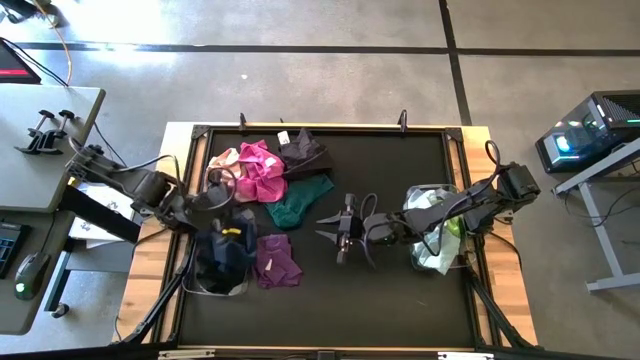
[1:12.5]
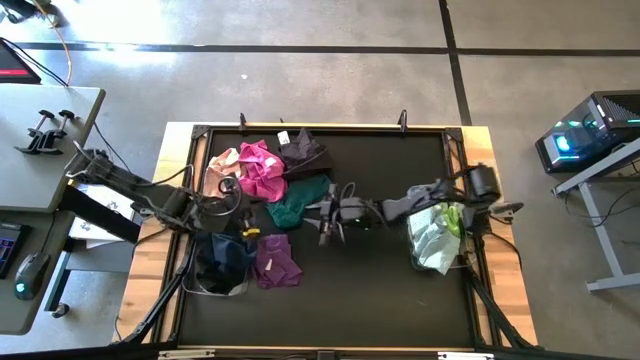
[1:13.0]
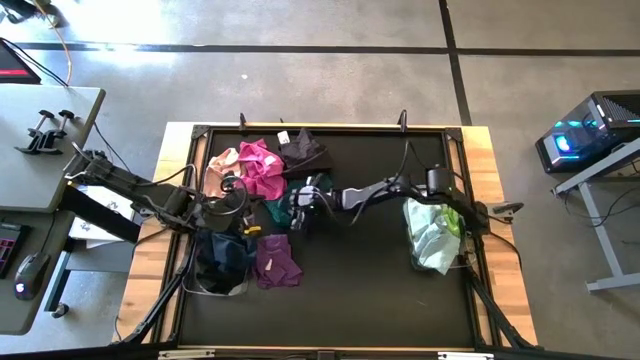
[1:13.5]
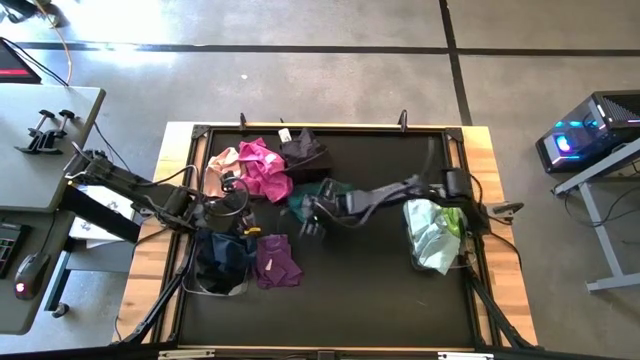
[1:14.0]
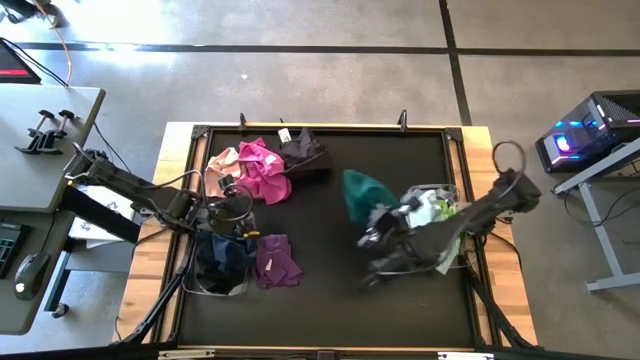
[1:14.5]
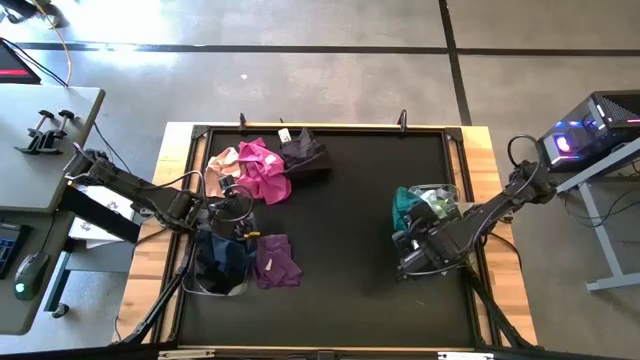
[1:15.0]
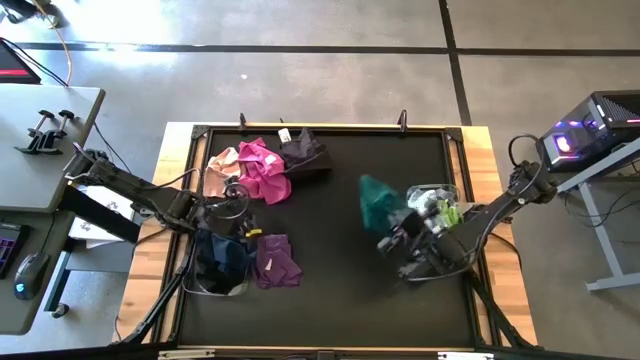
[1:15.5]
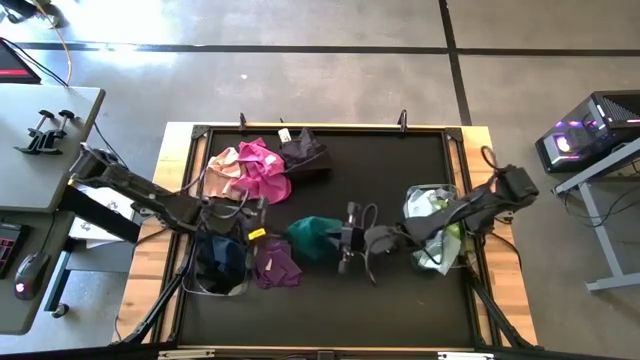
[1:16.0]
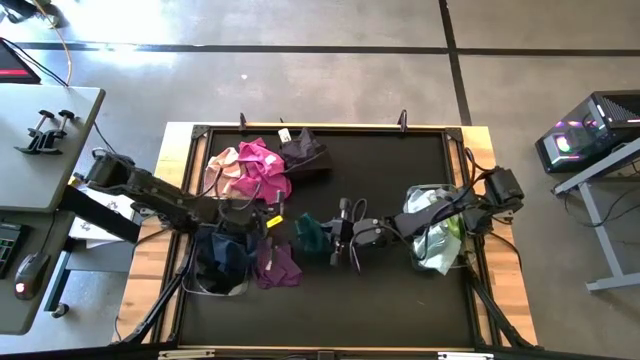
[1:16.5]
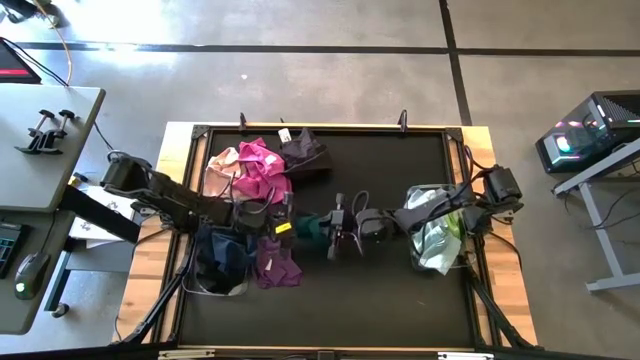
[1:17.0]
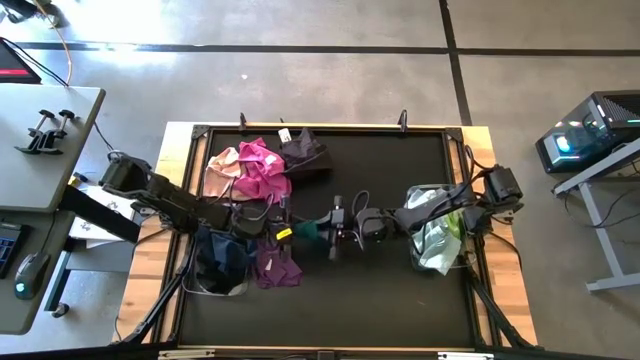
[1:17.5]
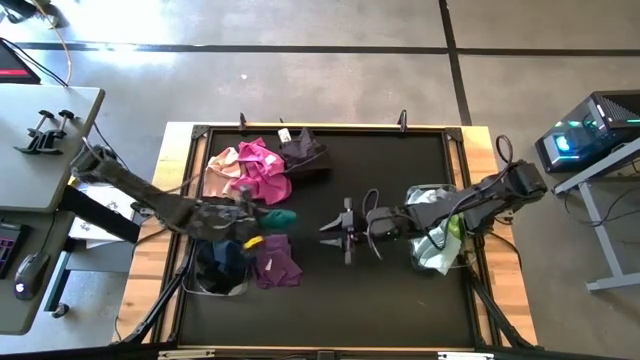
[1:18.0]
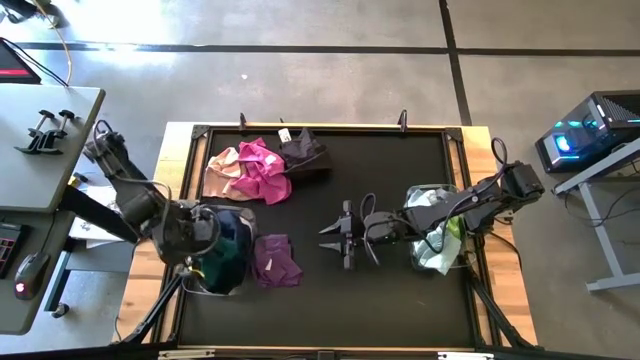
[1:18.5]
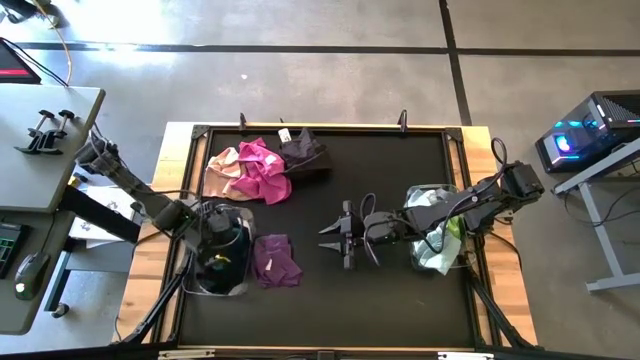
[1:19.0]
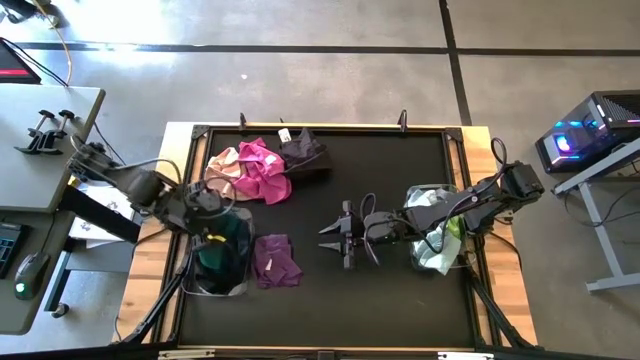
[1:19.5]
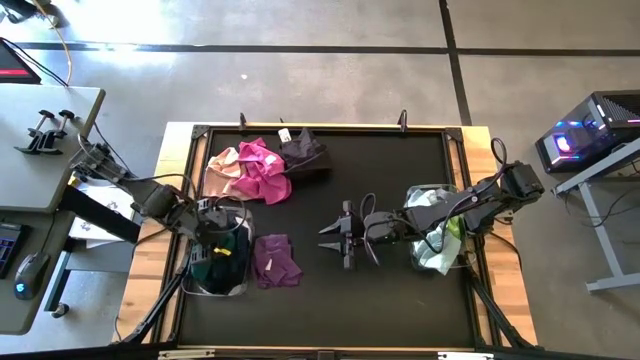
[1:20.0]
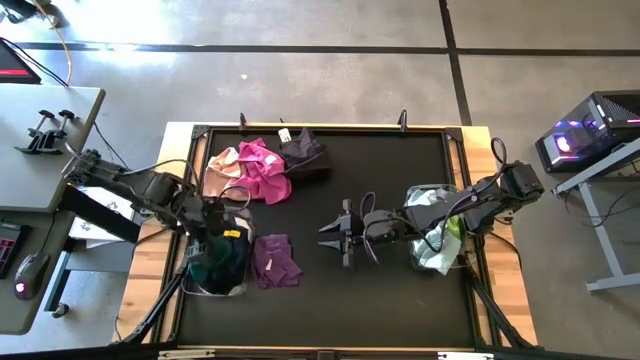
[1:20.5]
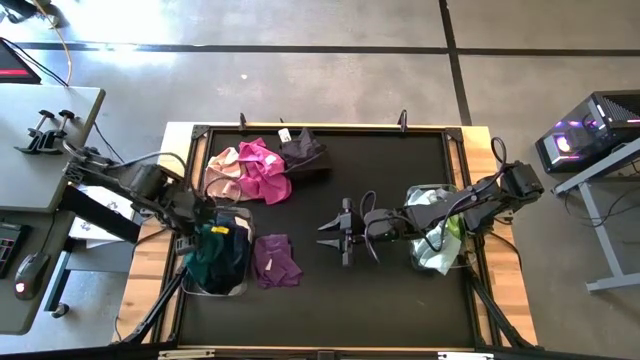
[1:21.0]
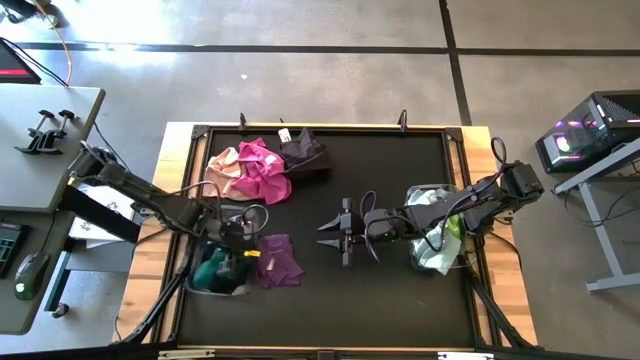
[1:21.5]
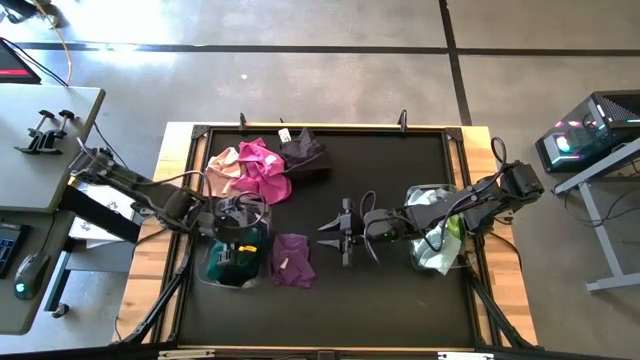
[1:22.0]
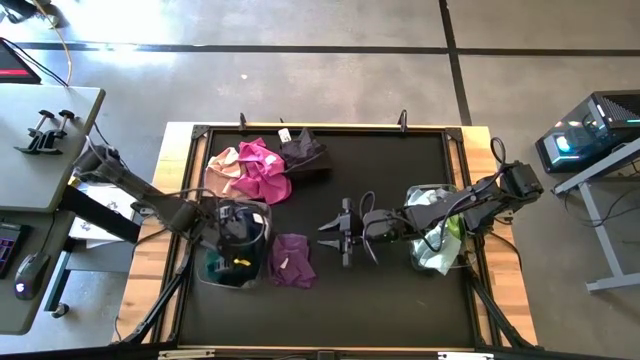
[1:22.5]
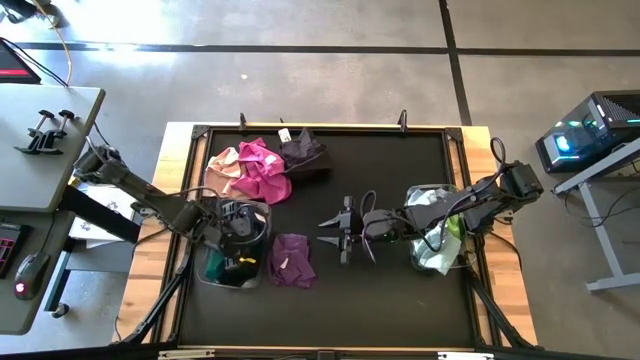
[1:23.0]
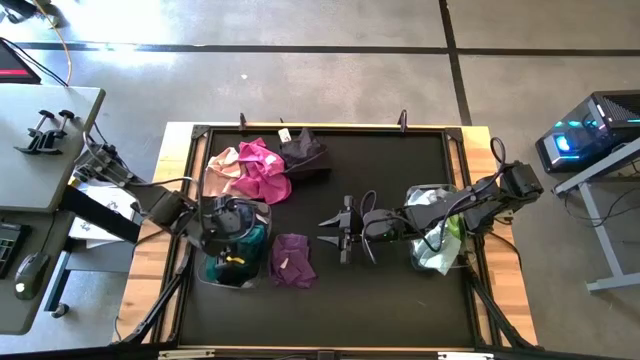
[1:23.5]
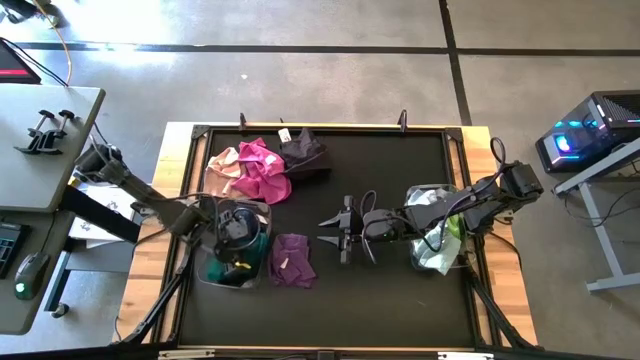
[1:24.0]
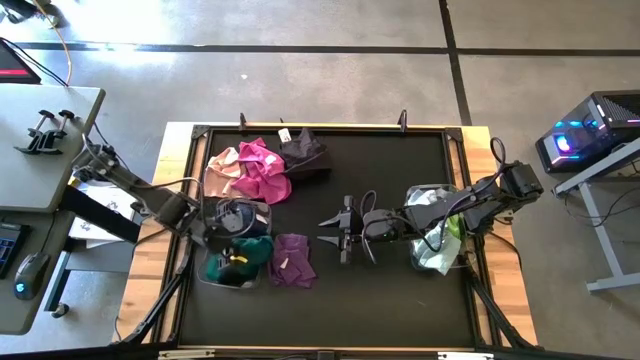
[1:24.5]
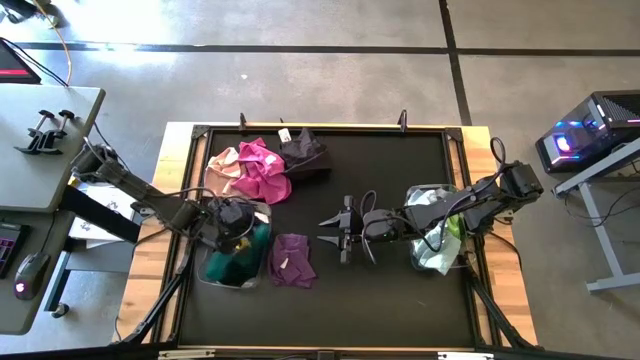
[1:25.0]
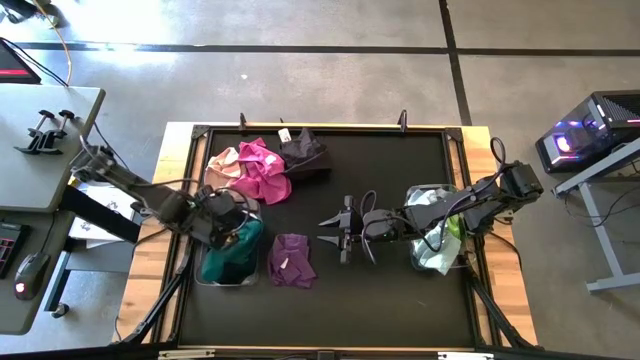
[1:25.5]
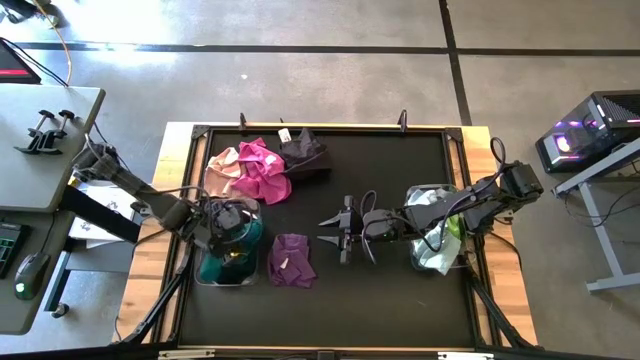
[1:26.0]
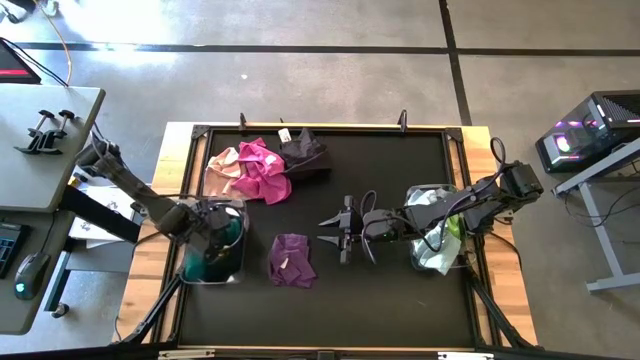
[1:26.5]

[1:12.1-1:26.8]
Task: Sort towels by color in basket
Put the dark green towel into the left transparent bin

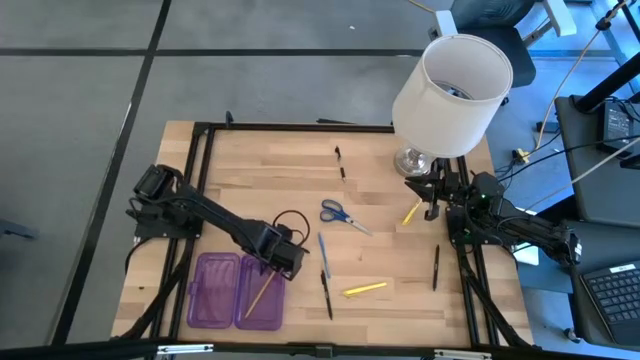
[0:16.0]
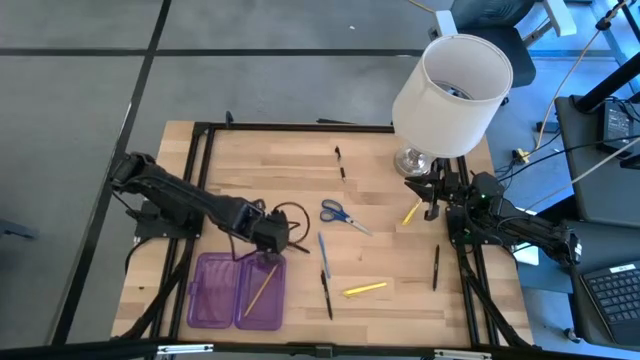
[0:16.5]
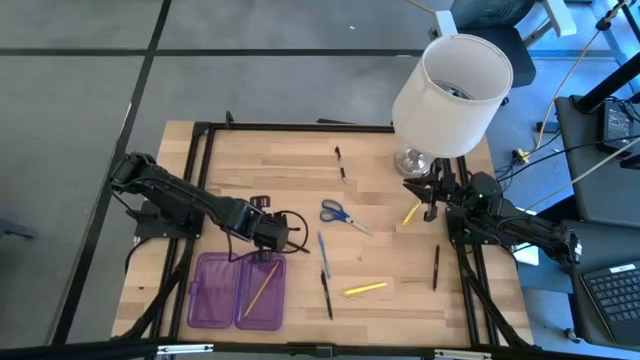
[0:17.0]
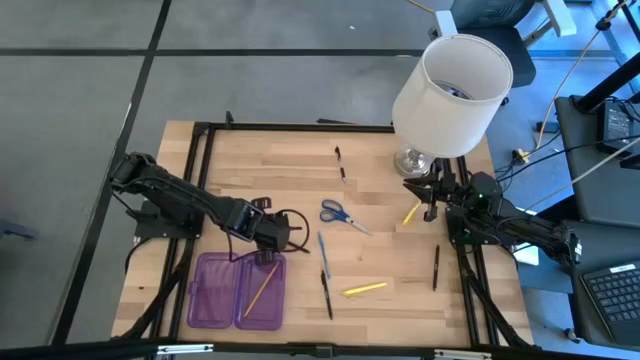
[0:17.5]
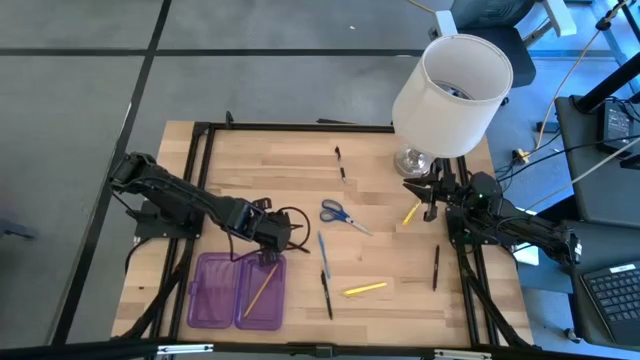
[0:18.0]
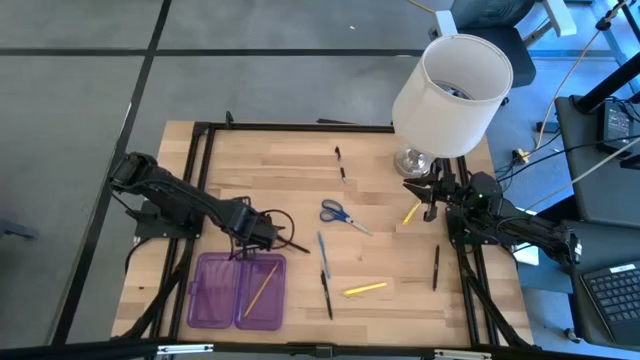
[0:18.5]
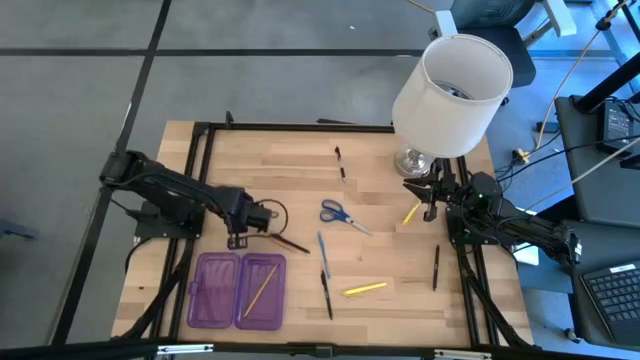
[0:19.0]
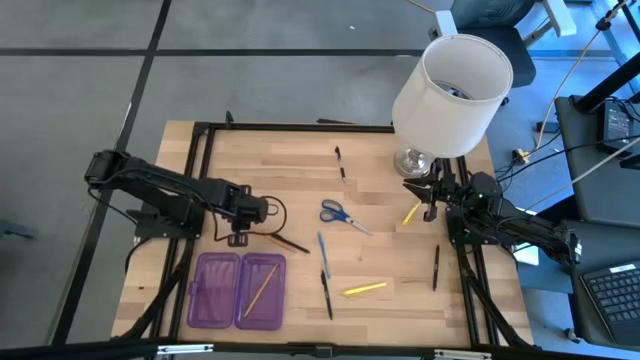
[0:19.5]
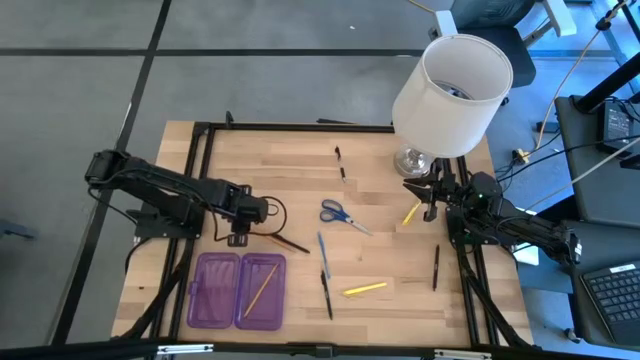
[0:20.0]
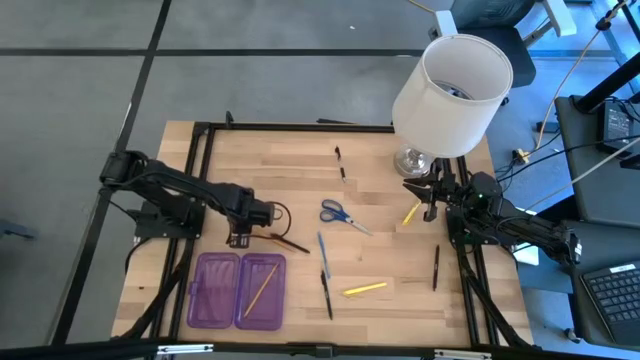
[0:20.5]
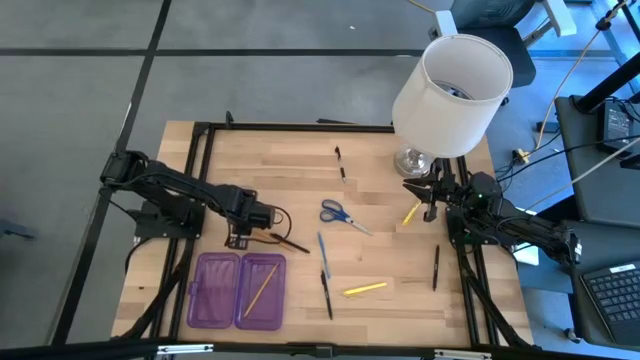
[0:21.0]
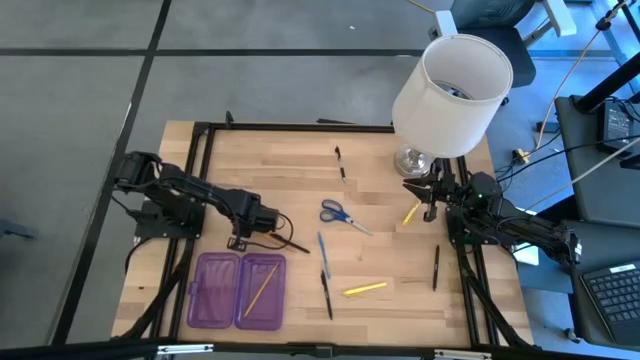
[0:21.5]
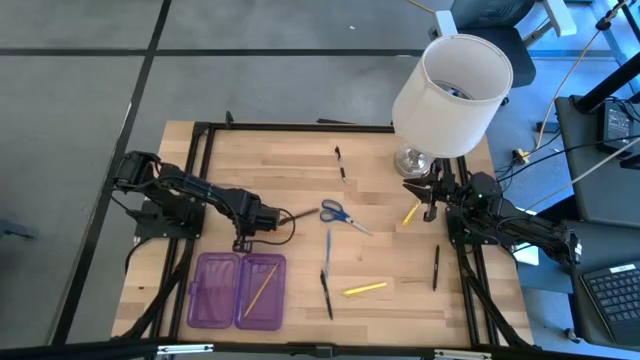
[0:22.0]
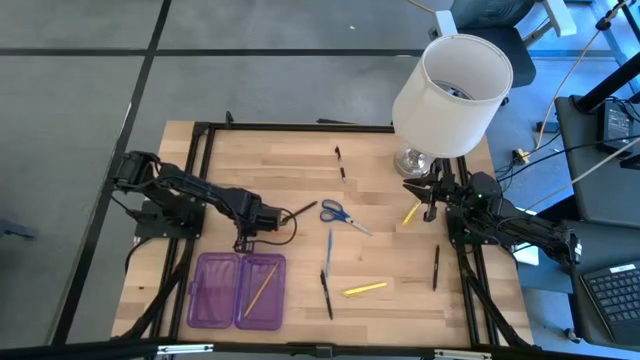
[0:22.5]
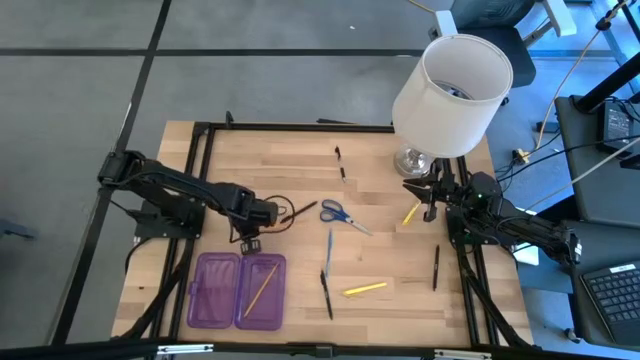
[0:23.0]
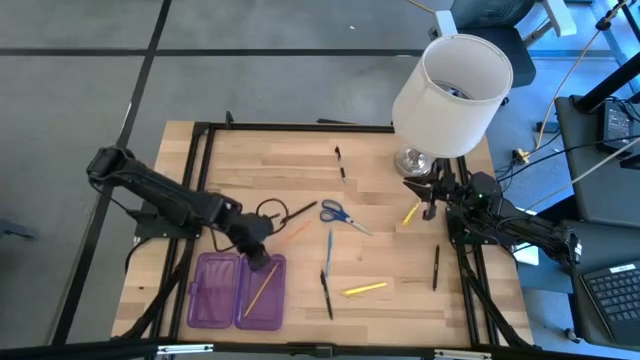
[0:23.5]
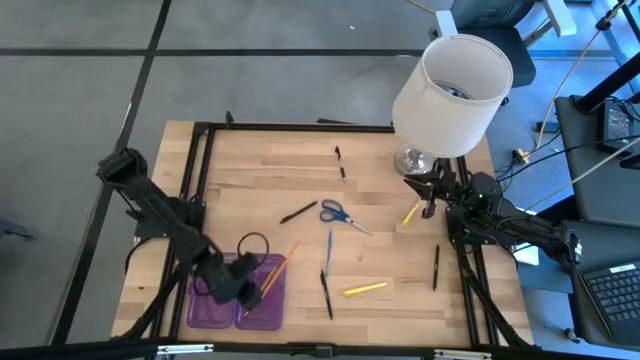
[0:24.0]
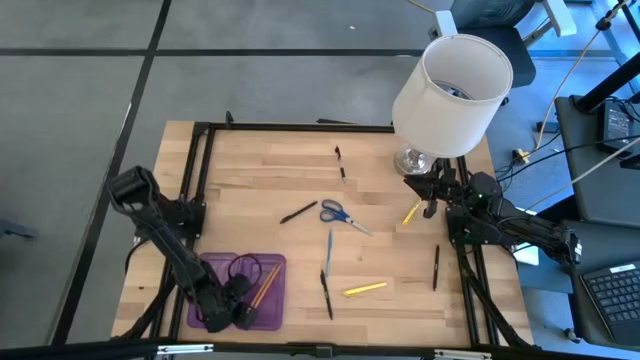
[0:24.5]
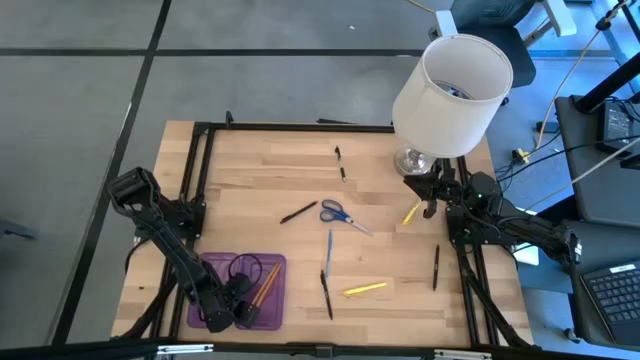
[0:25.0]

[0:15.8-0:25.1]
Task: Pick & place school supplies into a supply box
Put the orange pencil into the violet box
